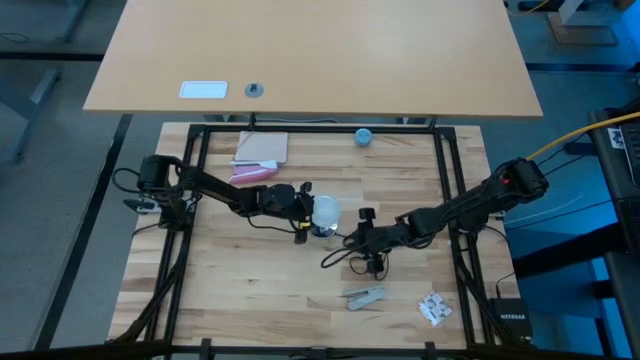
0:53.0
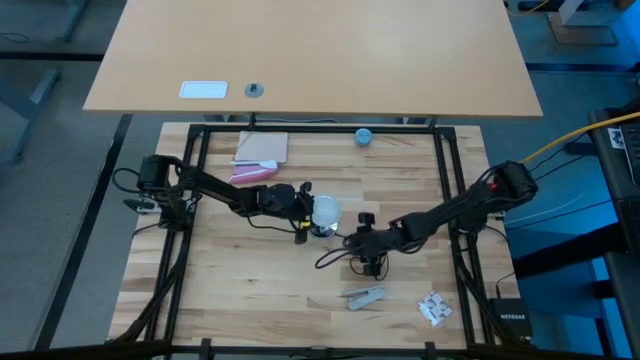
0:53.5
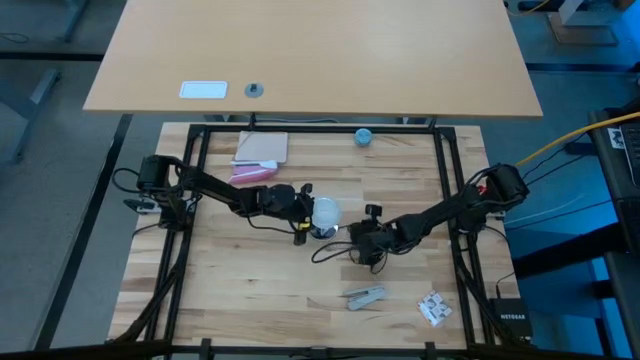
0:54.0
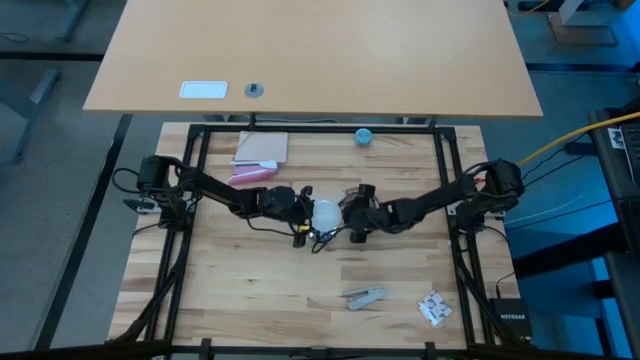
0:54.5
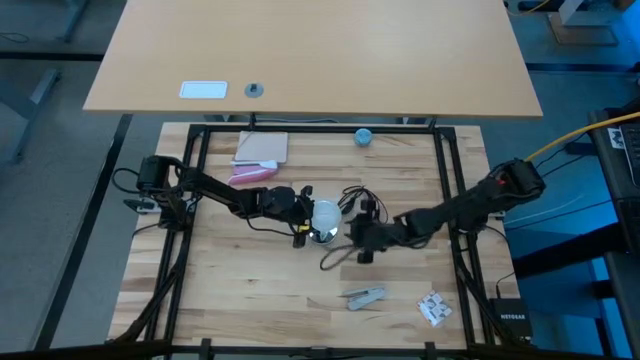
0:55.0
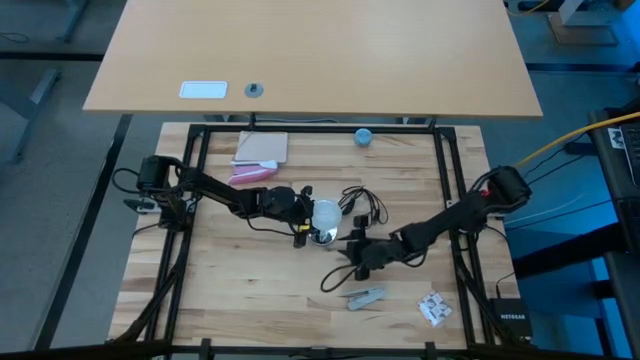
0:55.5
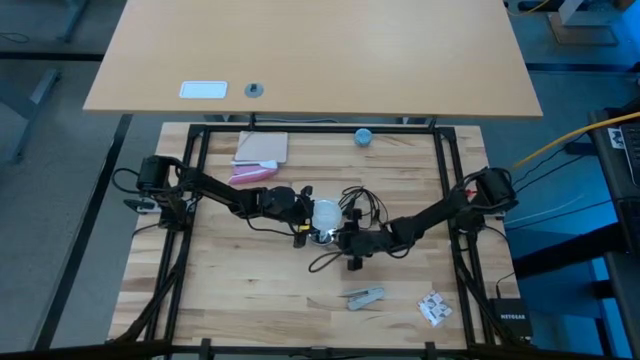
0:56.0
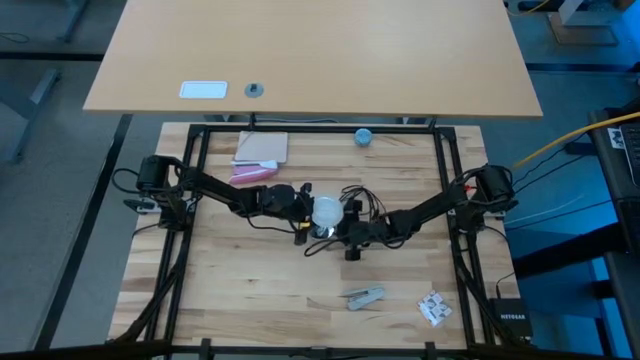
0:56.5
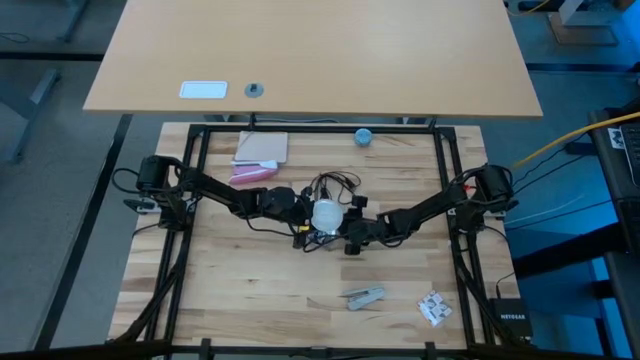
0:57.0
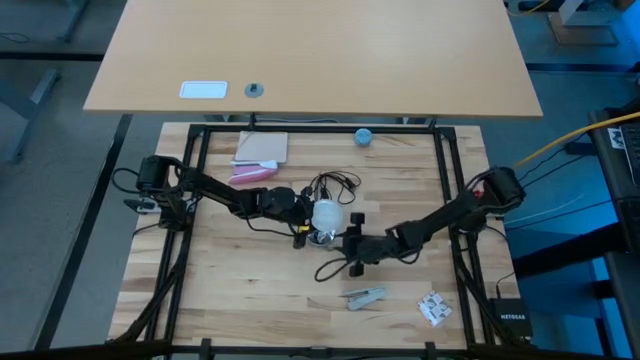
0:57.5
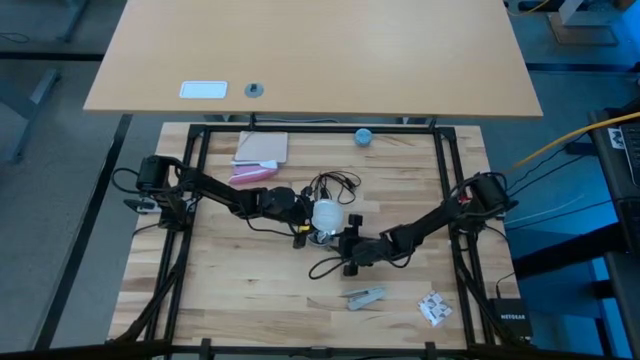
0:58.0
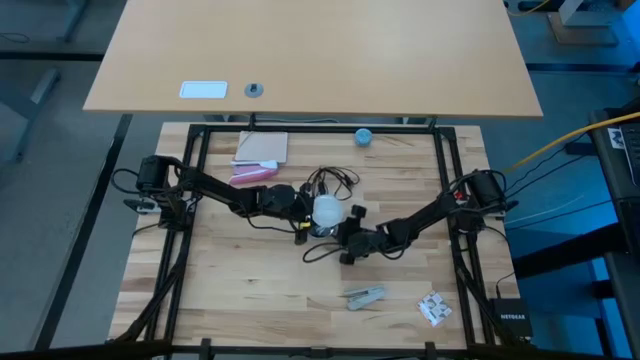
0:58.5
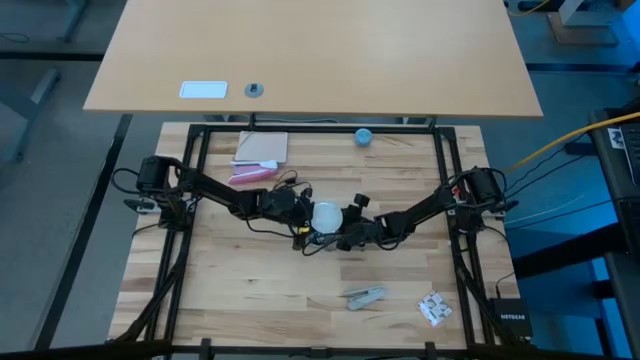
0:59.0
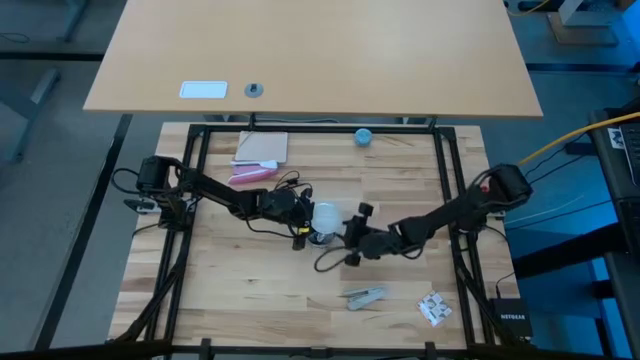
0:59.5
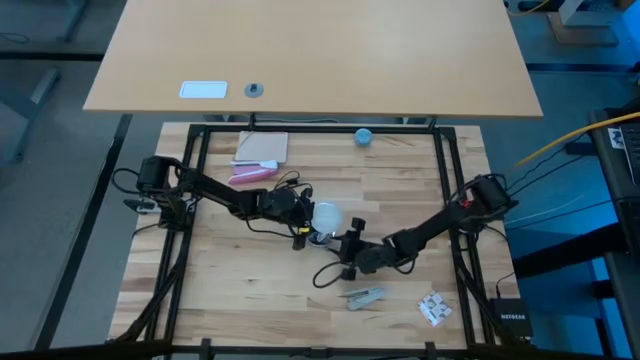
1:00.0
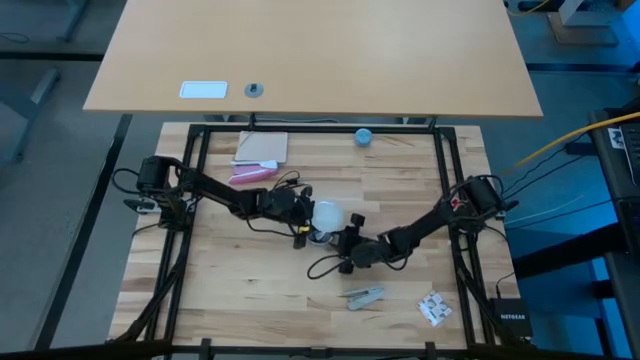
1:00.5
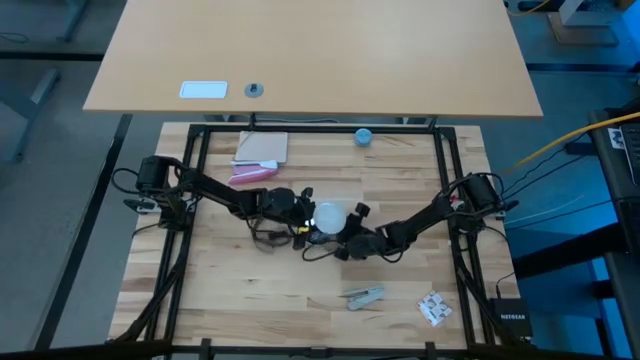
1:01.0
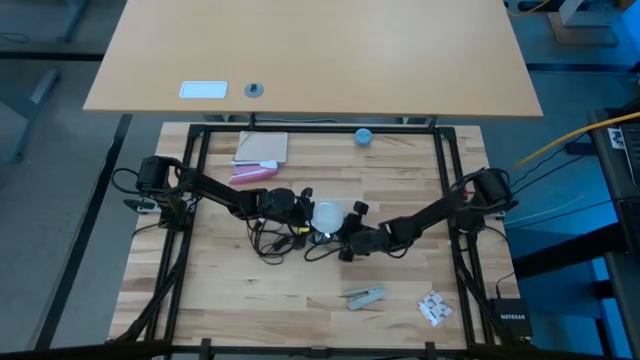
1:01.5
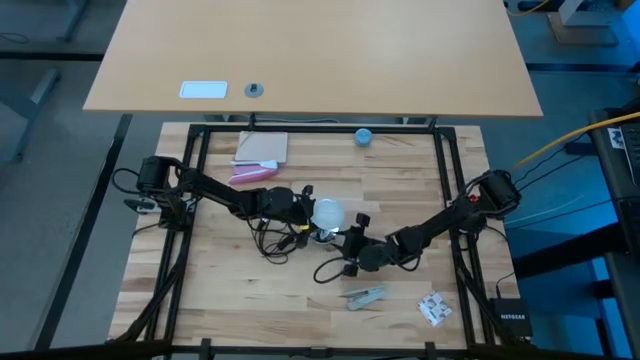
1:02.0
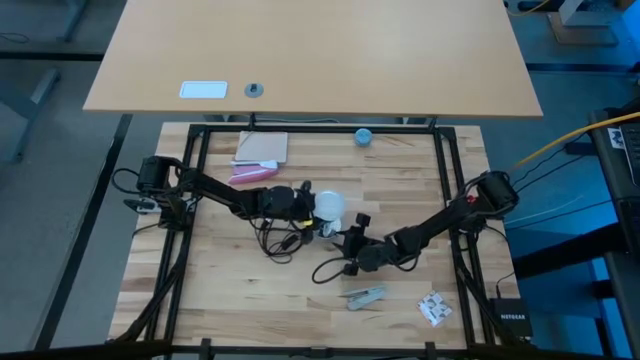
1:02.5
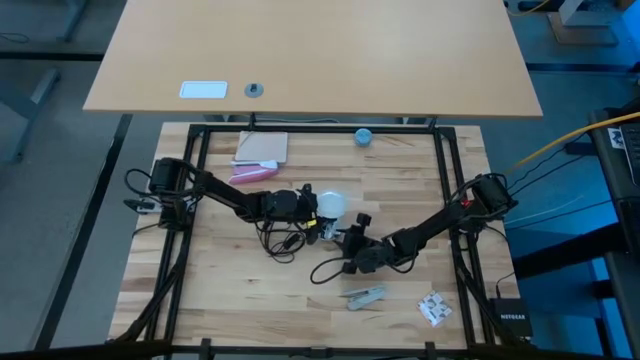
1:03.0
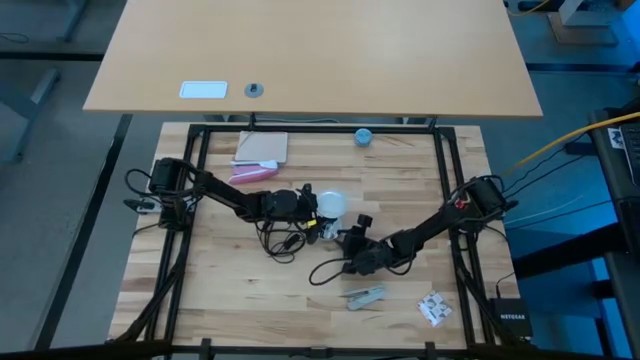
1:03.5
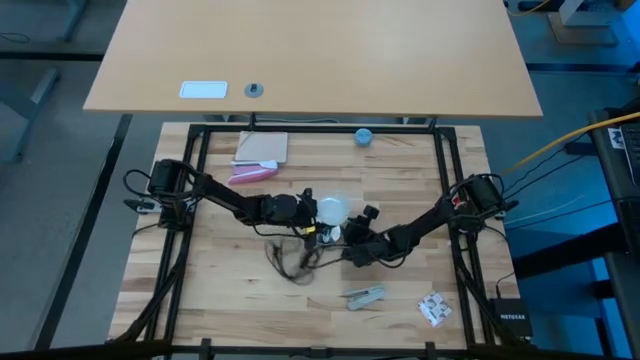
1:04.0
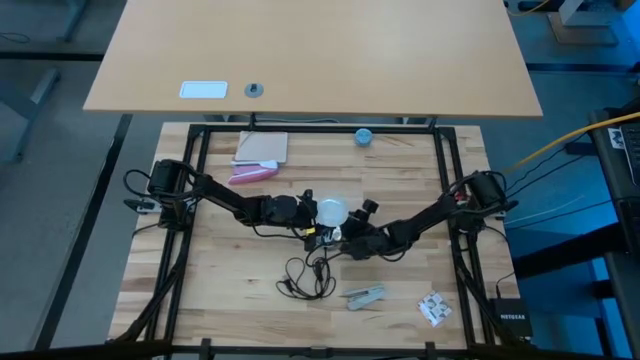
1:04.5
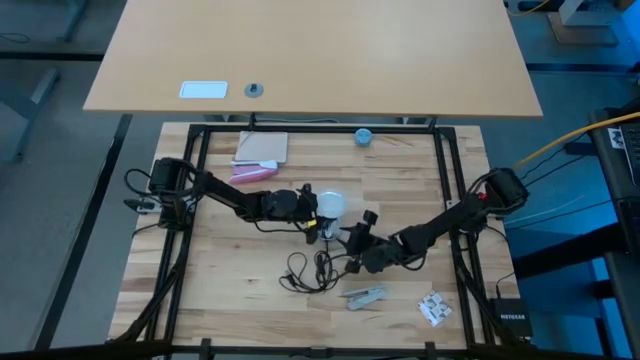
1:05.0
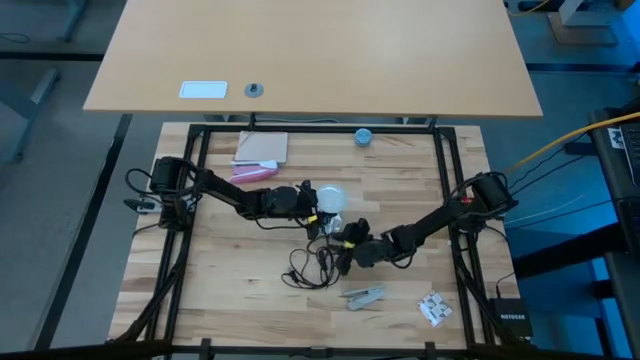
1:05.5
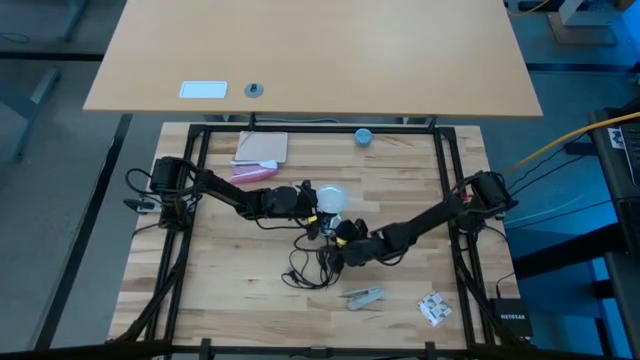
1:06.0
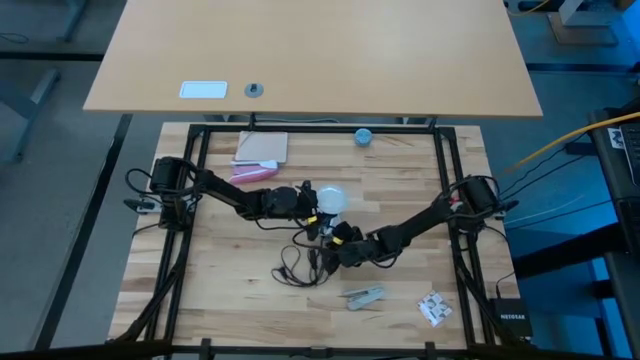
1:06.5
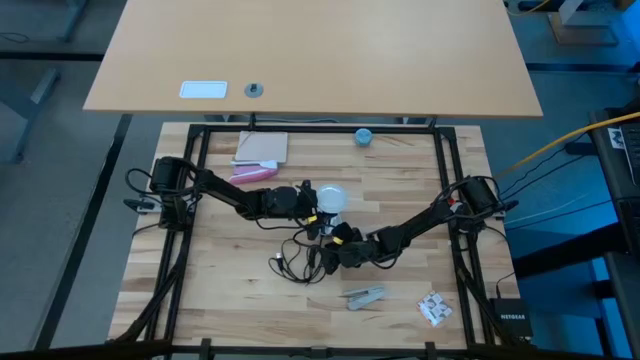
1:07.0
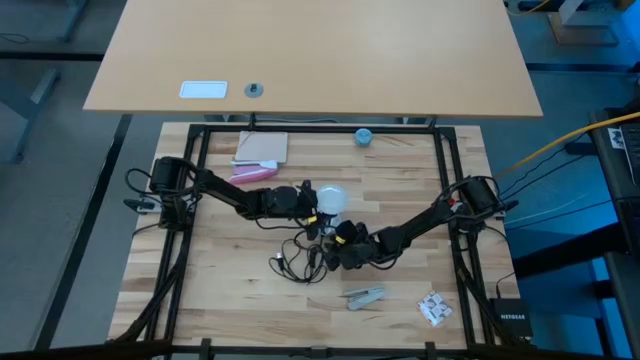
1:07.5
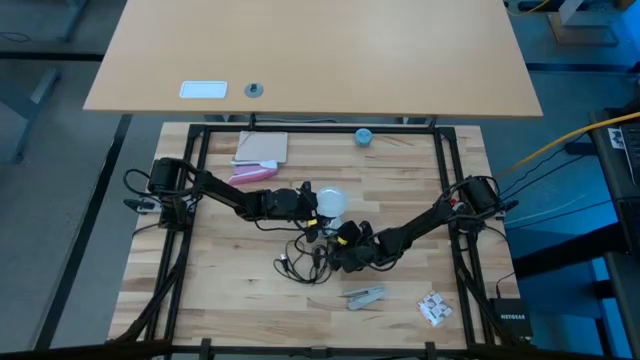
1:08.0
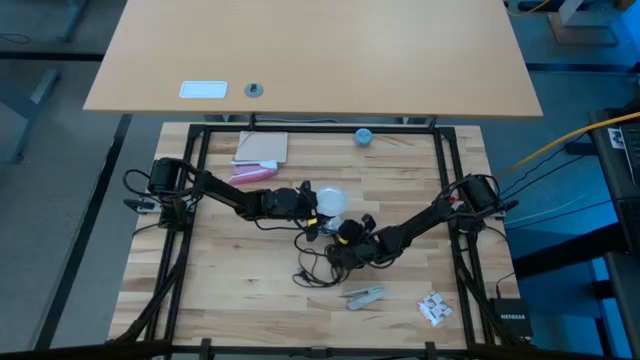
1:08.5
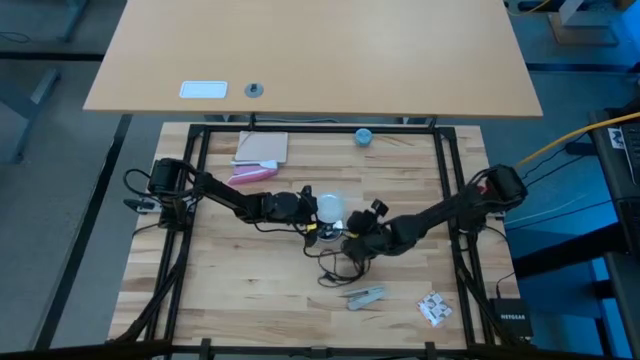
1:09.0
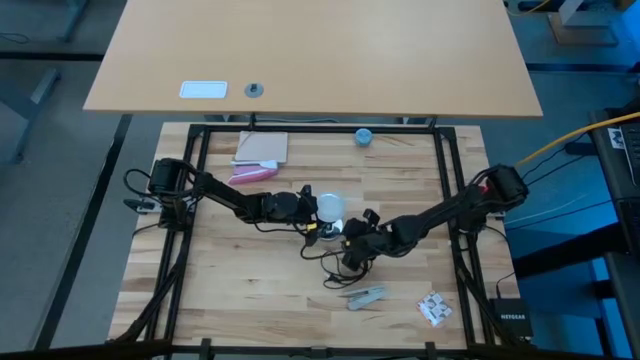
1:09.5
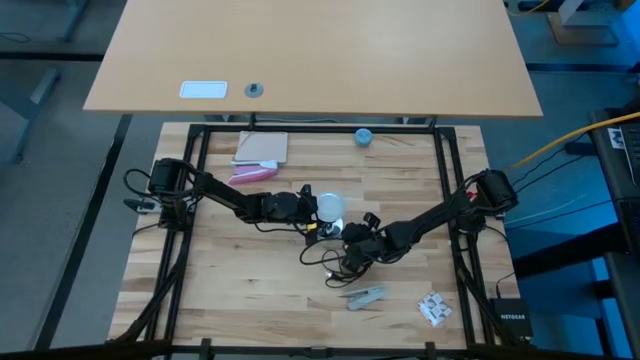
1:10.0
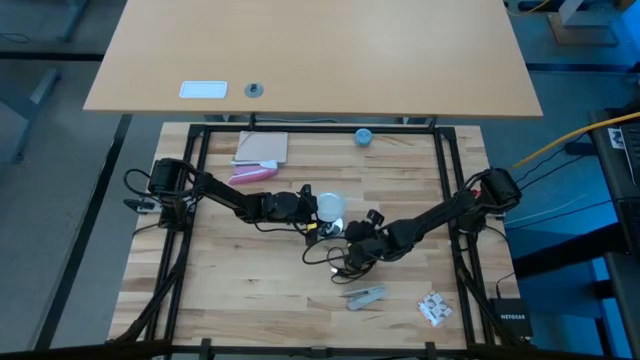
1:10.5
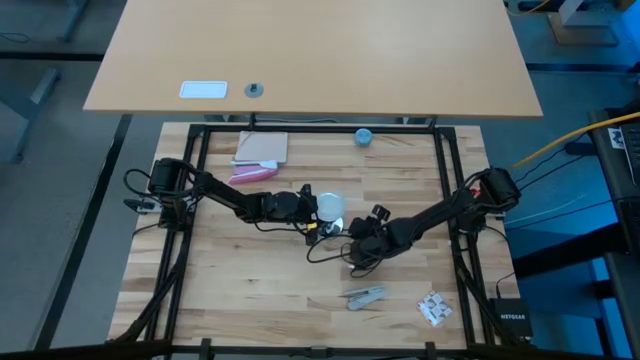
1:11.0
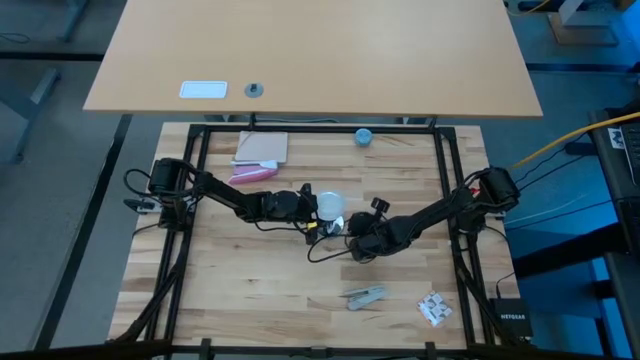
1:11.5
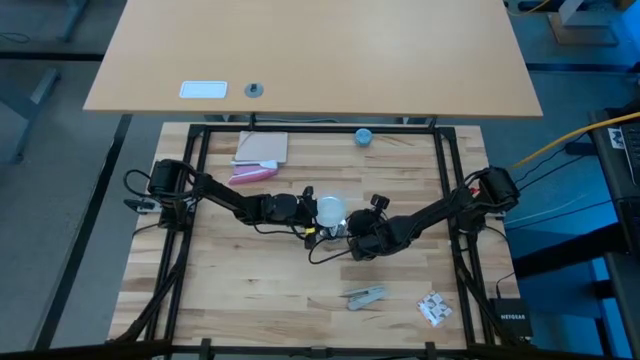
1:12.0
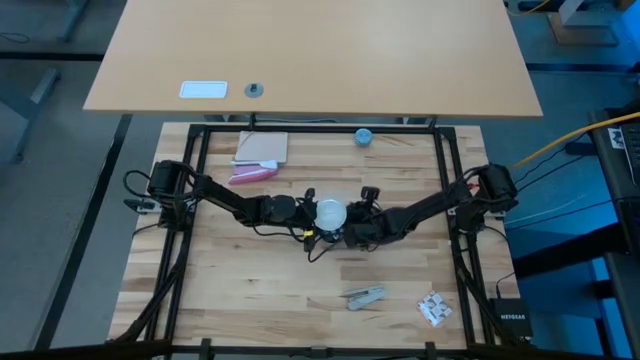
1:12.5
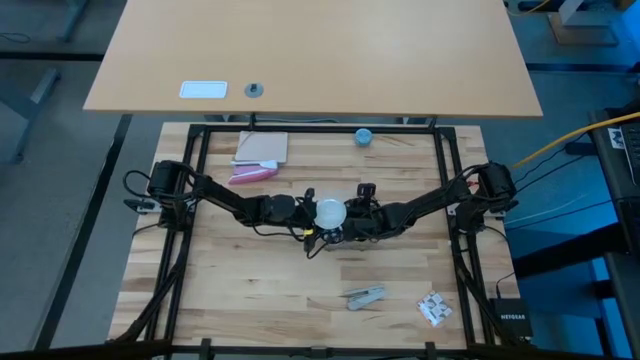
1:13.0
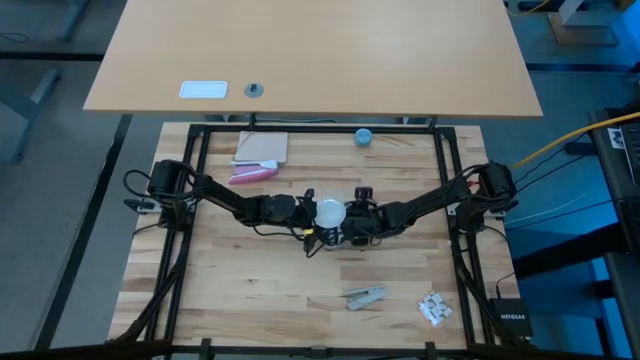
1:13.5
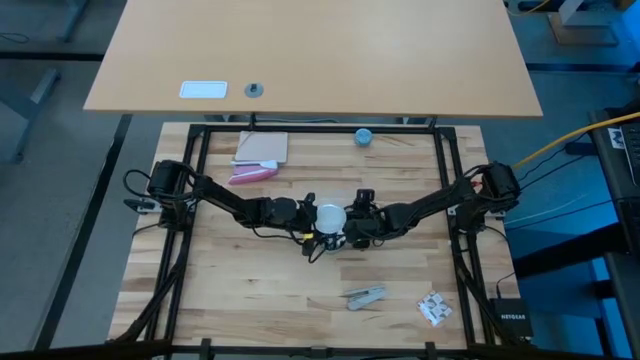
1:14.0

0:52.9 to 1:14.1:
Task: Screw lightbulb
Insert the lightbulb into the lamp
